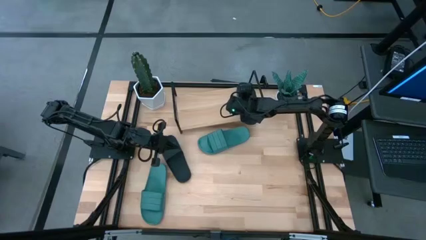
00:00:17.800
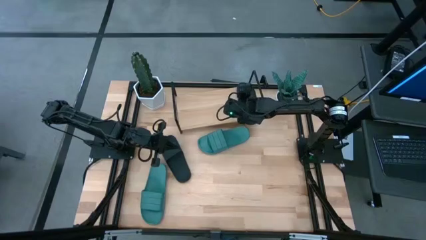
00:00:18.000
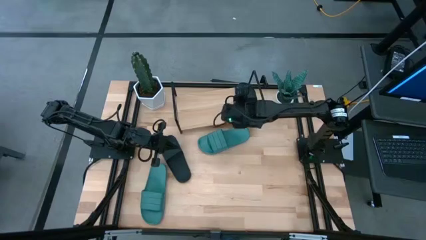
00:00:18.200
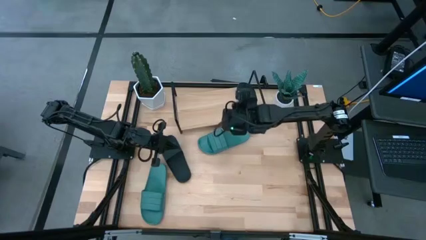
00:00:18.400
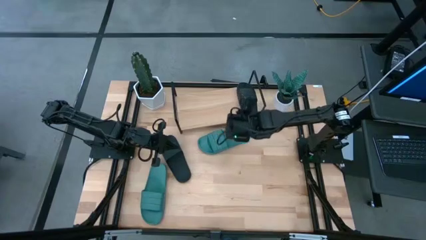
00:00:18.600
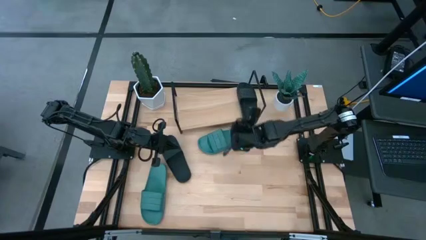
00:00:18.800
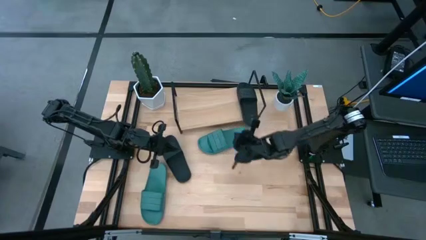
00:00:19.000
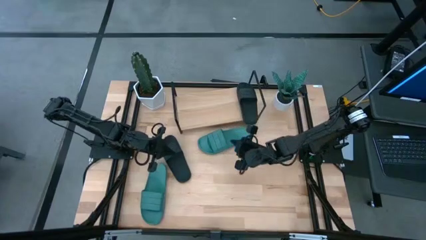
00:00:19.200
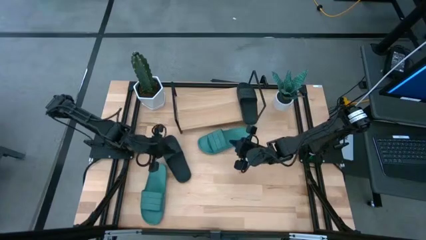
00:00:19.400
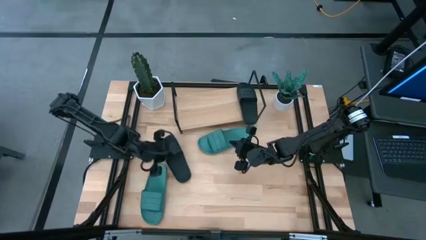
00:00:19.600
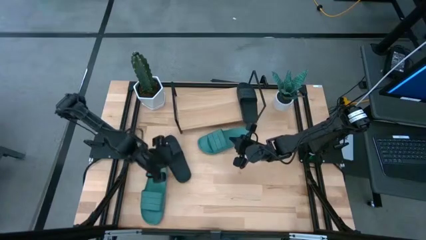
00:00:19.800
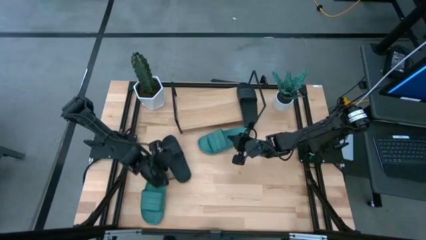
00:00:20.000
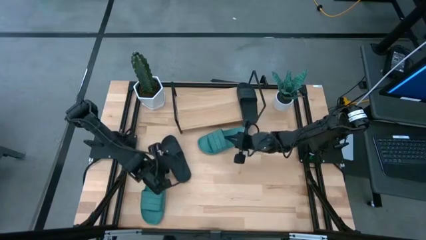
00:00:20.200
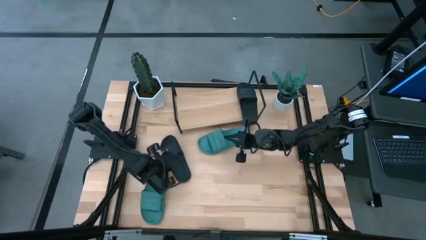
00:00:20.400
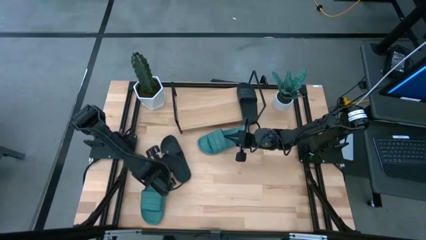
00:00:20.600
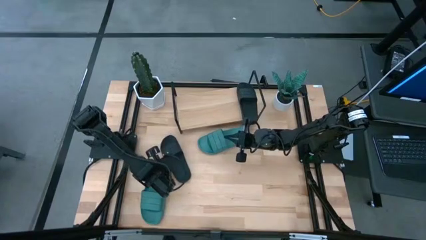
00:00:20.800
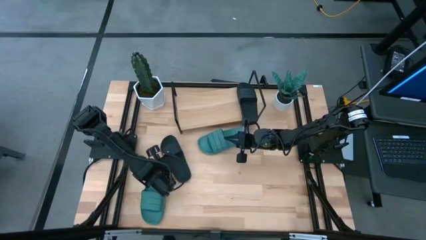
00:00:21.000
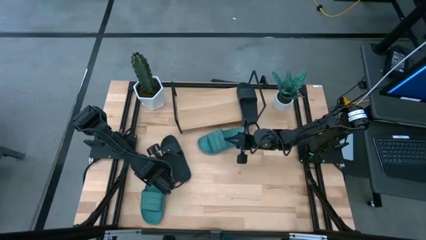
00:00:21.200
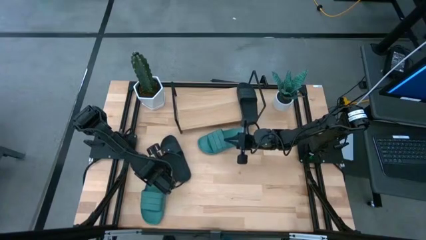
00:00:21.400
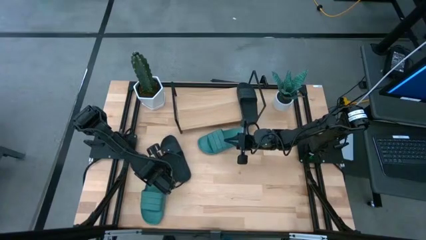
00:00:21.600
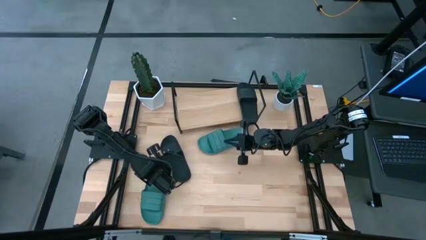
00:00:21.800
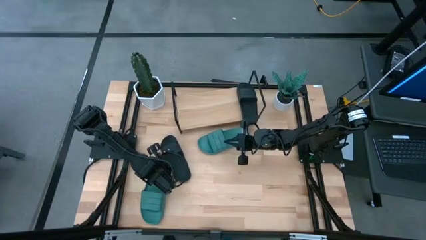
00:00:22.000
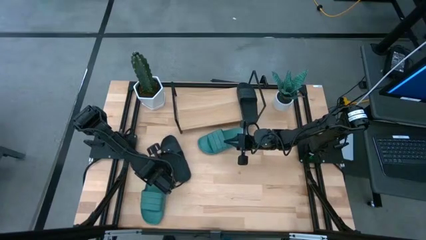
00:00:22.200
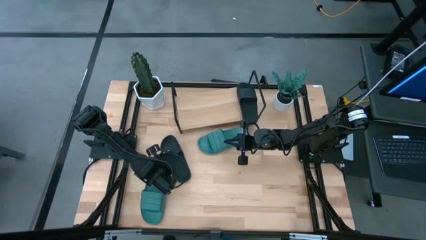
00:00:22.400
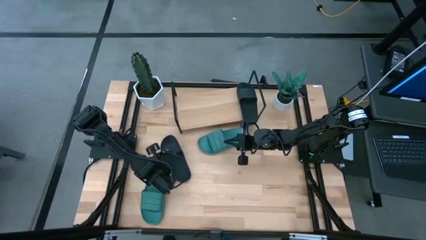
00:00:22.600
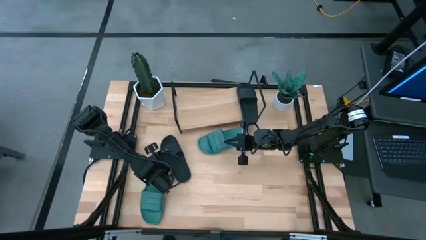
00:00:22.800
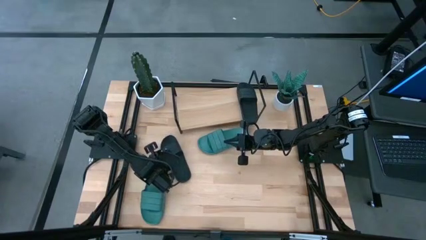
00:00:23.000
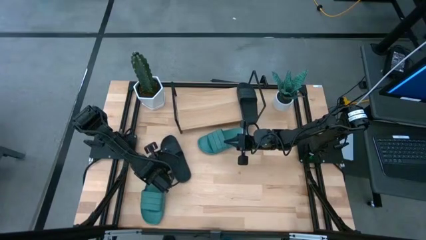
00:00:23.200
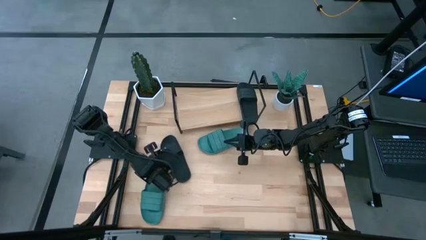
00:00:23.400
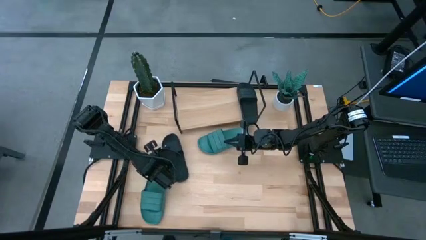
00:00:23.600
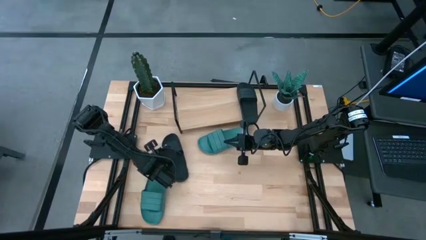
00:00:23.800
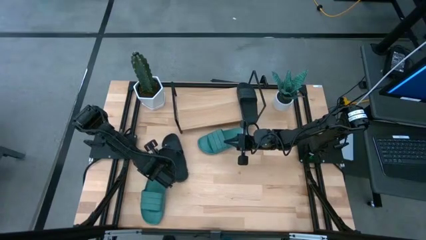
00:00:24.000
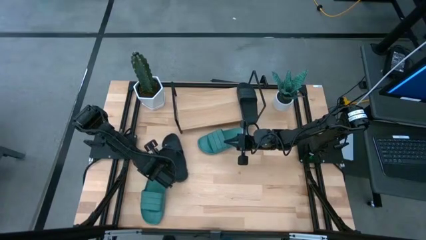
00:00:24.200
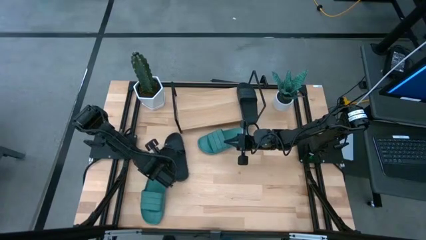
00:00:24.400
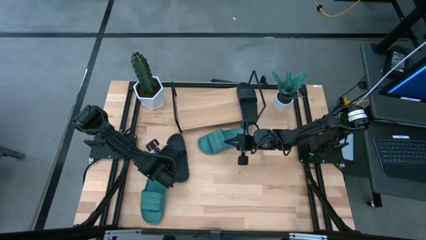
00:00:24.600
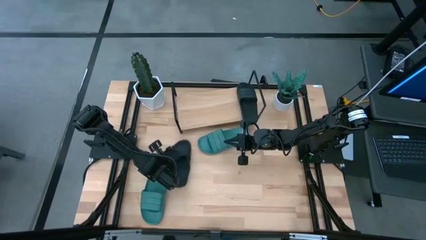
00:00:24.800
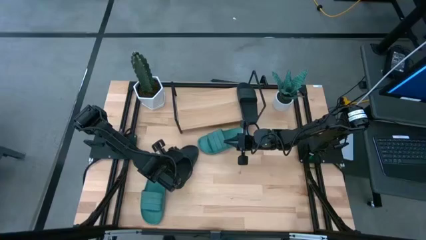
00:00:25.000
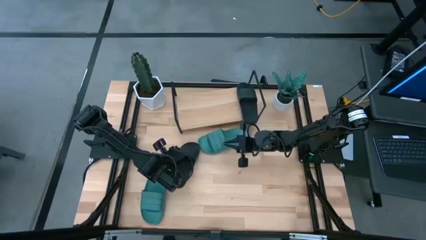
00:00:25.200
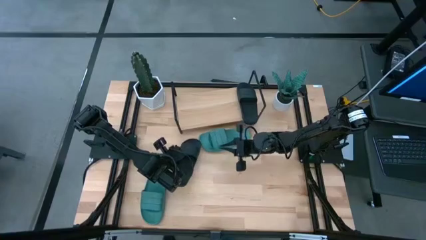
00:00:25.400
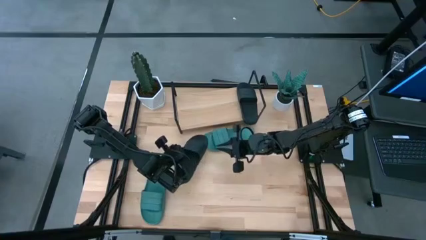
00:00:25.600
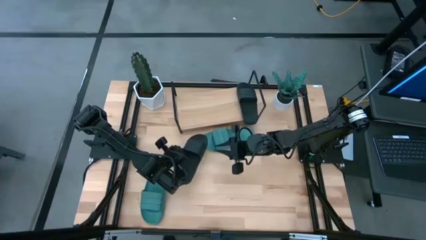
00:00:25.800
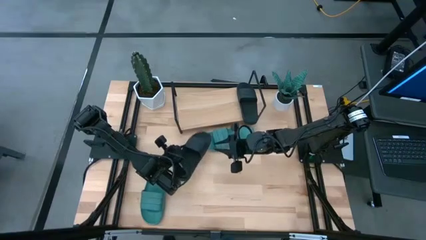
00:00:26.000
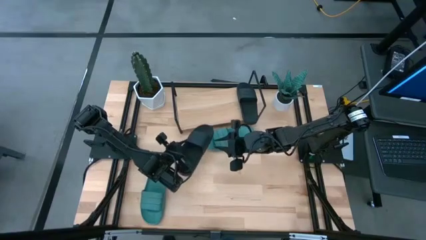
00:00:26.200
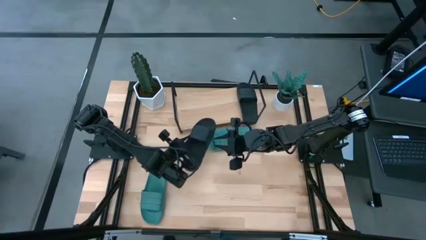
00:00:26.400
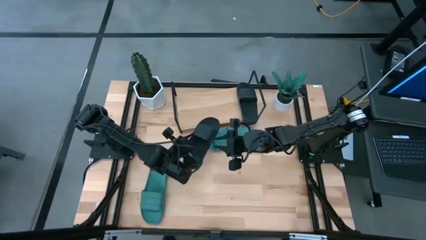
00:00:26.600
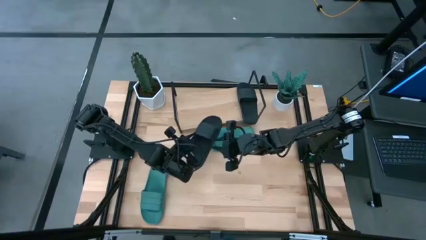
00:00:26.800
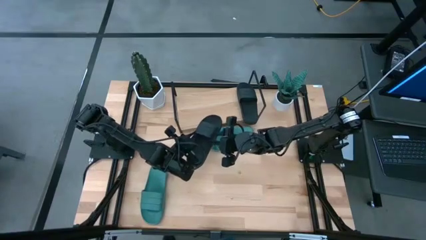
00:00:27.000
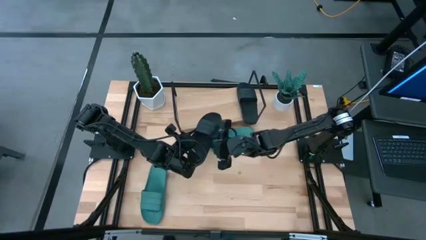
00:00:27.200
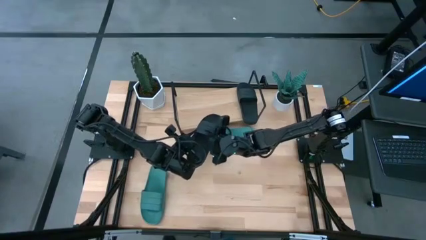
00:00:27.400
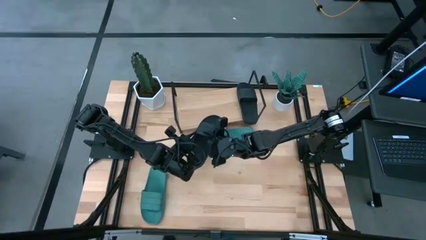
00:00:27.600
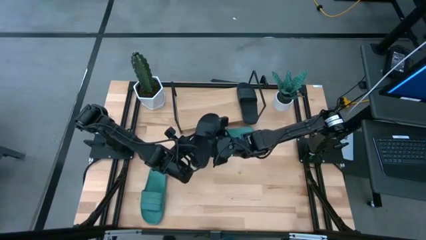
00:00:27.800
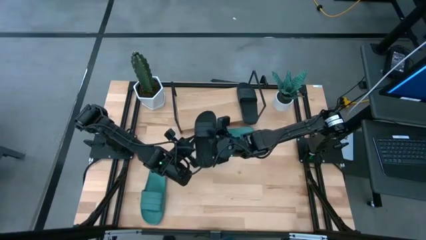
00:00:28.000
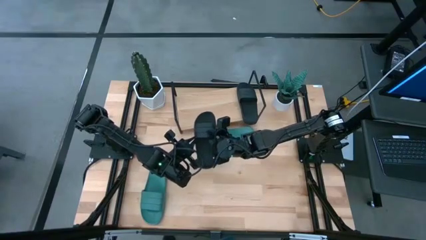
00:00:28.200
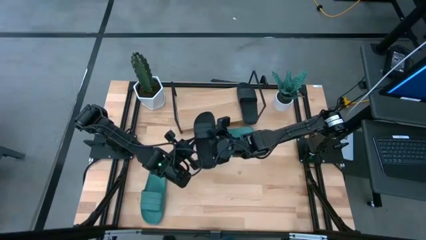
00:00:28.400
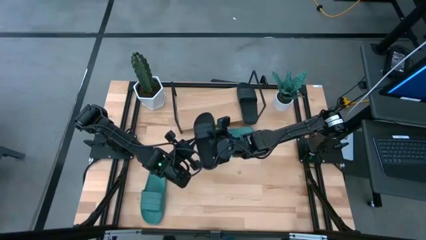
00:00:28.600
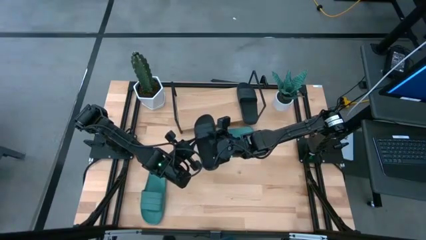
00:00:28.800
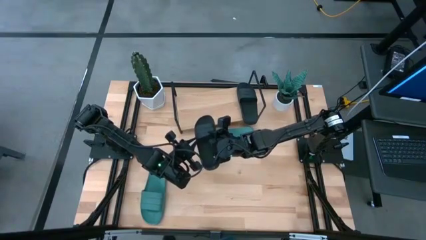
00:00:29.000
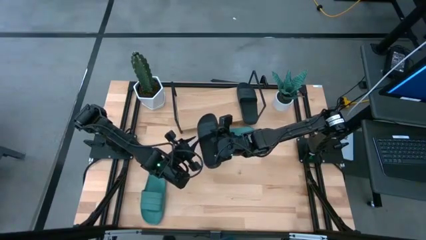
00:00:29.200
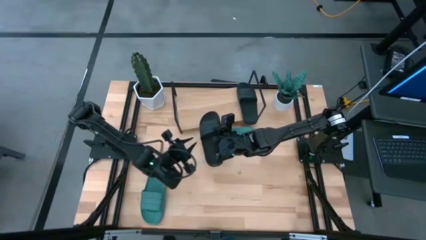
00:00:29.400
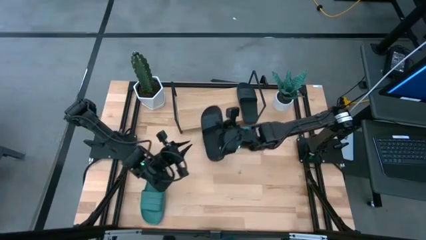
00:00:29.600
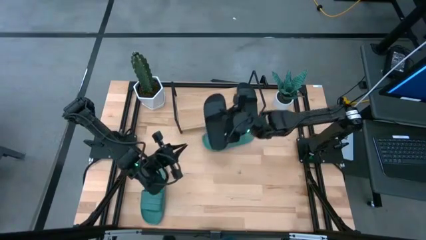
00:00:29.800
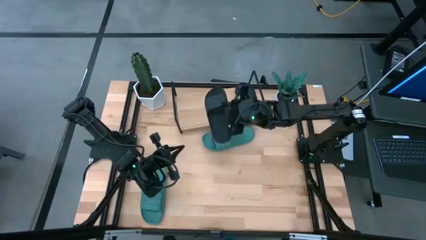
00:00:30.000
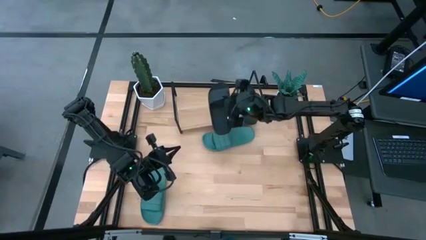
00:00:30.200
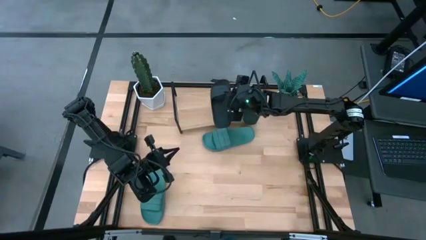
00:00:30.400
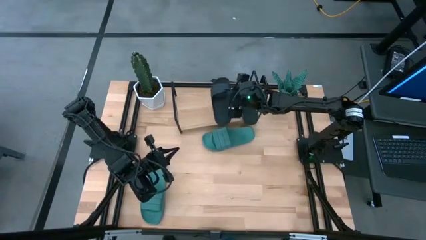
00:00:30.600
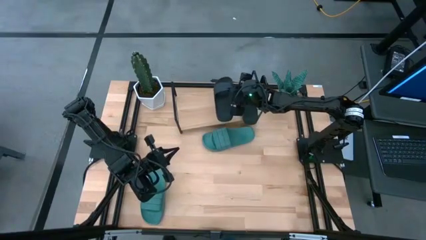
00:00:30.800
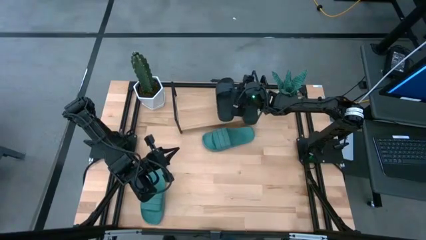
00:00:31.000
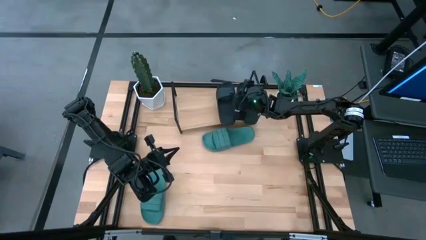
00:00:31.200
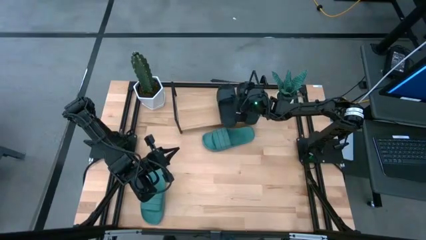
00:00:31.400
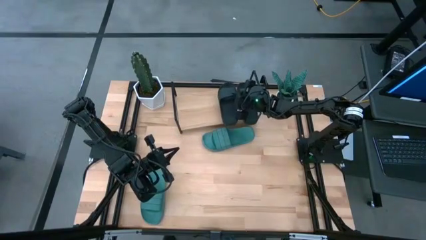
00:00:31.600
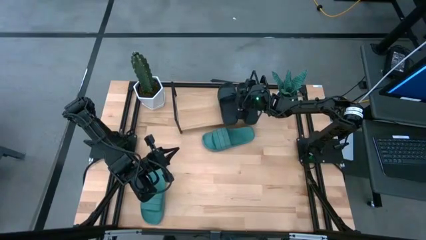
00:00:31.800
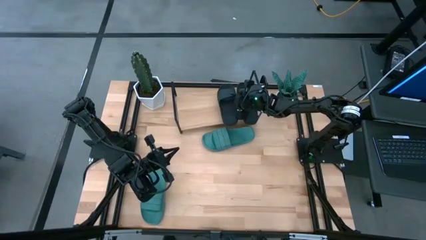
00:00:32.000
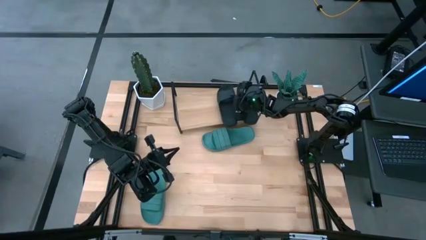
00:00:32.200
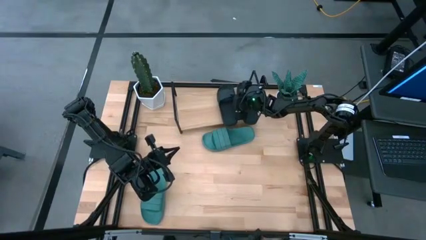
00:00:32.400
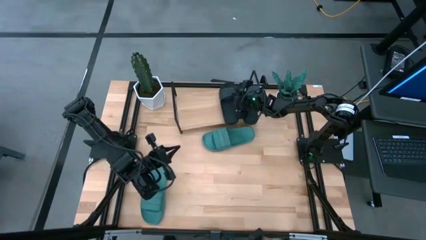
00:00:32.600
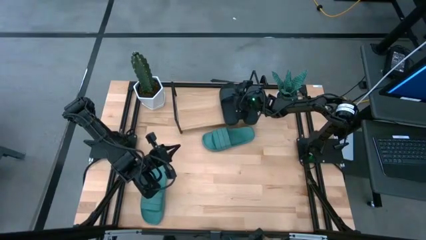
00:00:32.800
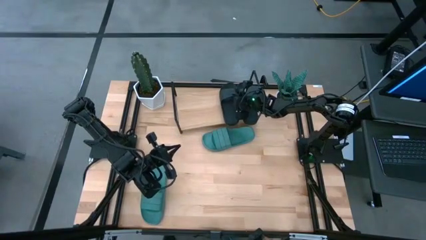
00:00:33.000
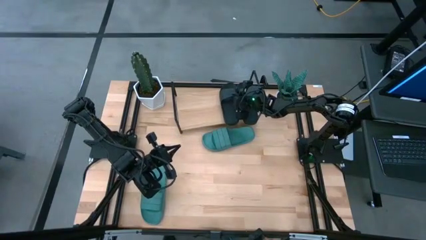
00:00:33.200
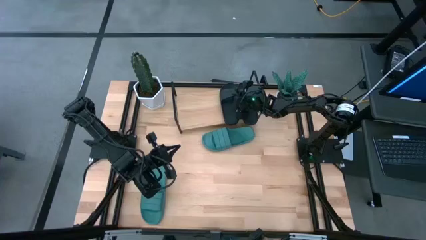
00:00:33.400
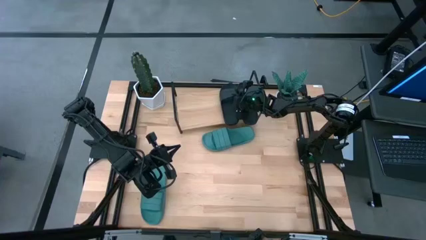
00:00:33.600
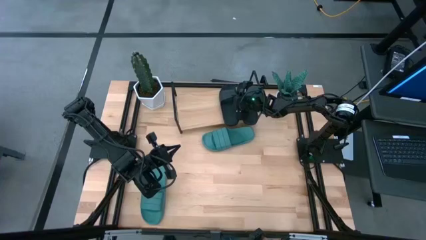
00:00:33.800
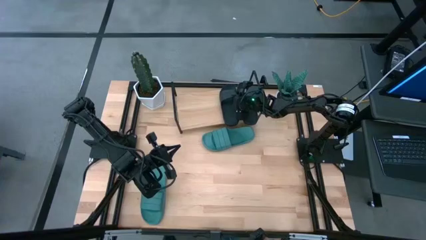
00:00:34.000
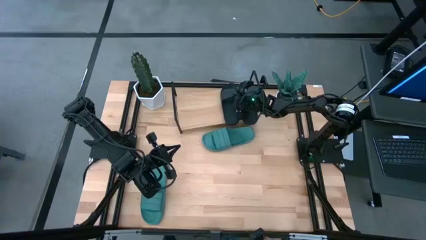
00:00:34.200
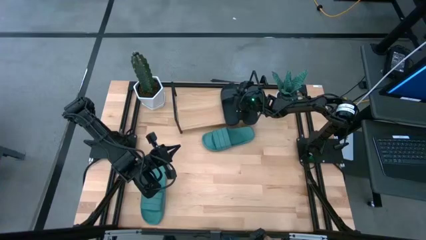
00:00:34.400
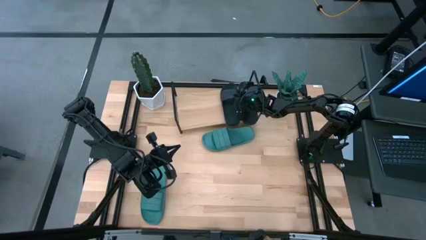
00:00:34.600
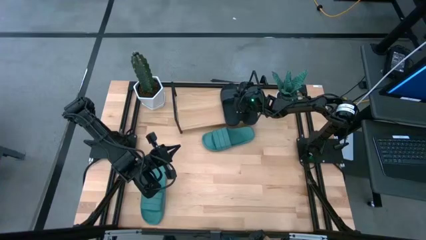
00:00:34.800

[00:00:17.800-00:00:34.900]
Task: Pick and place slides into the shelf
Put the black slide on the shelf
